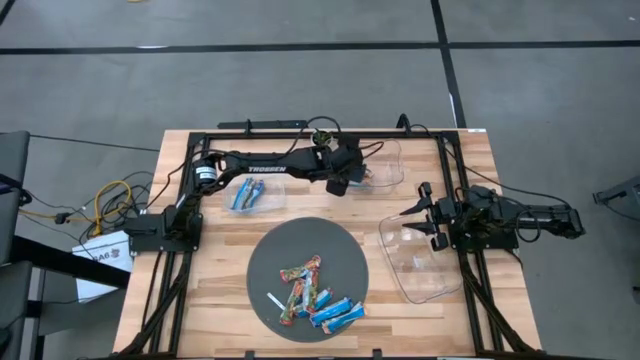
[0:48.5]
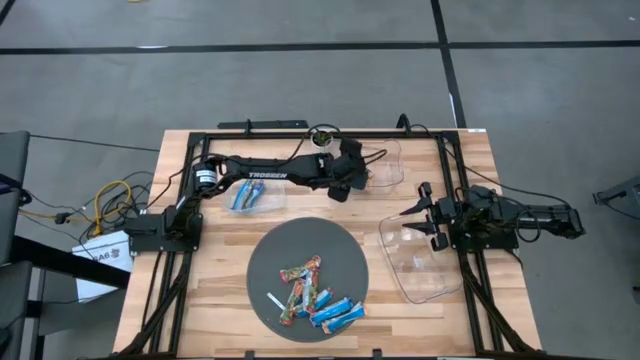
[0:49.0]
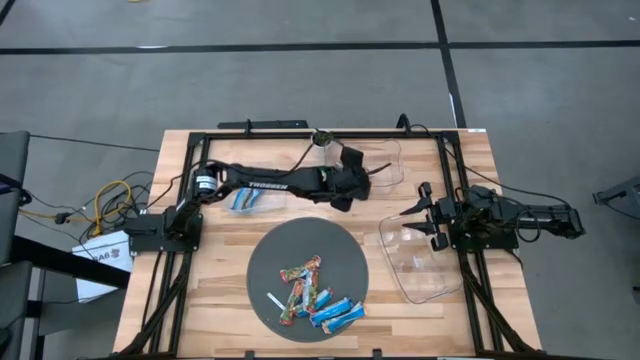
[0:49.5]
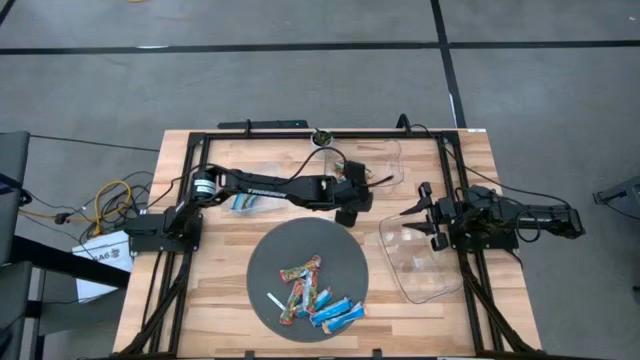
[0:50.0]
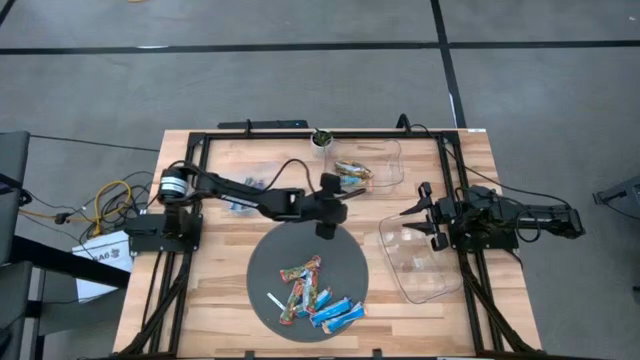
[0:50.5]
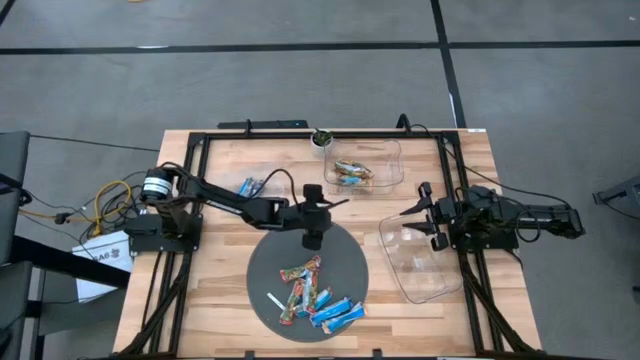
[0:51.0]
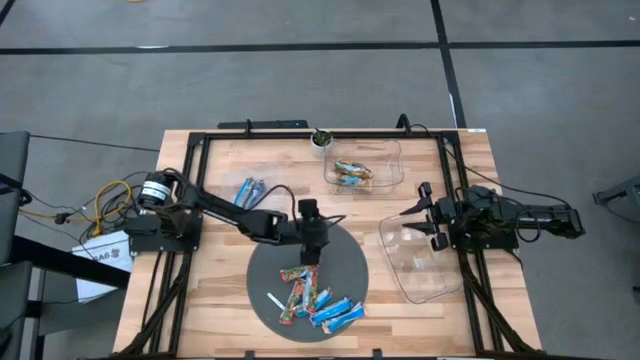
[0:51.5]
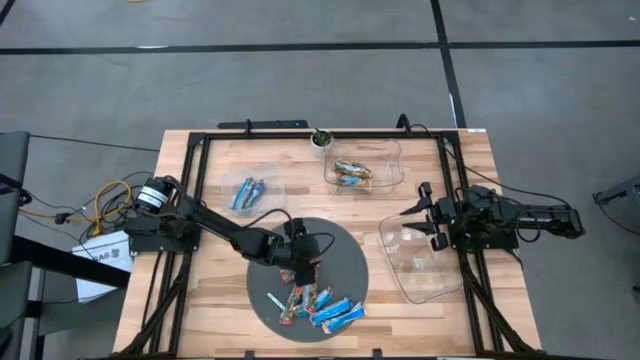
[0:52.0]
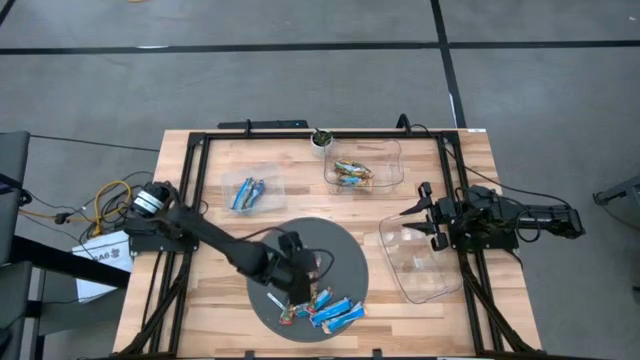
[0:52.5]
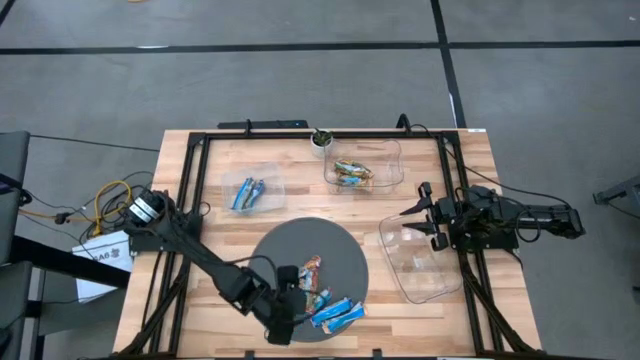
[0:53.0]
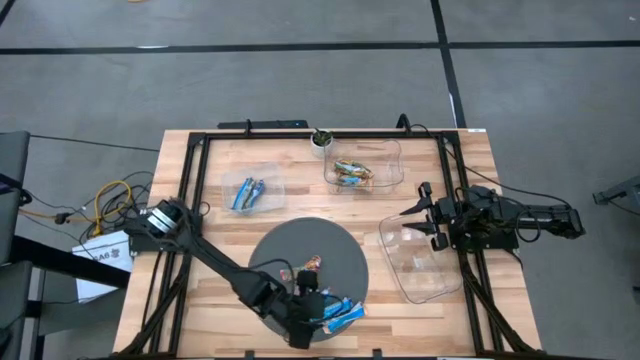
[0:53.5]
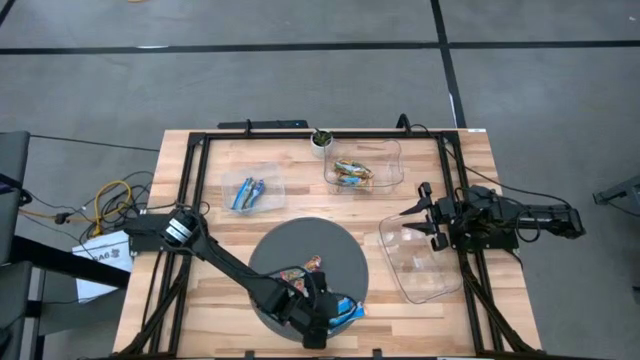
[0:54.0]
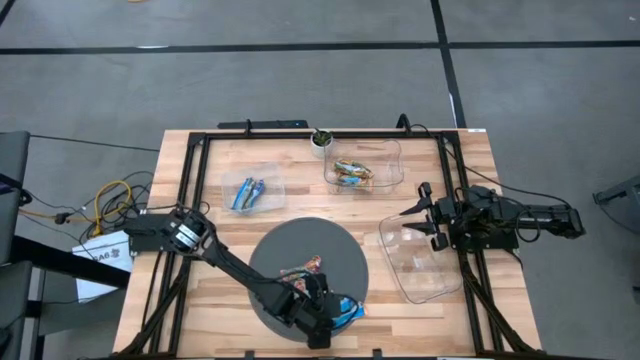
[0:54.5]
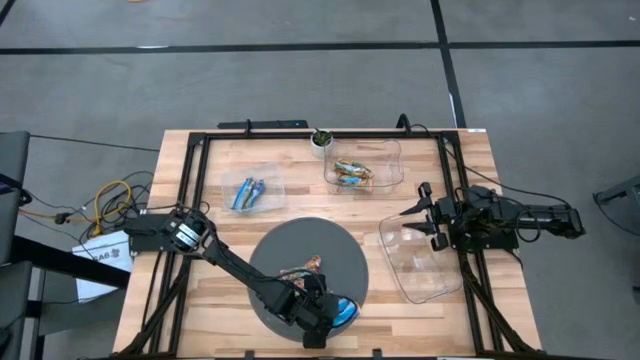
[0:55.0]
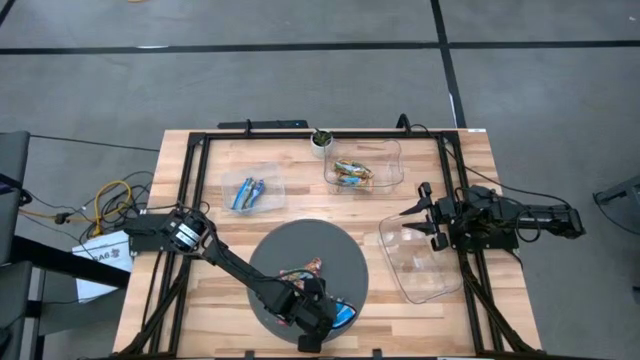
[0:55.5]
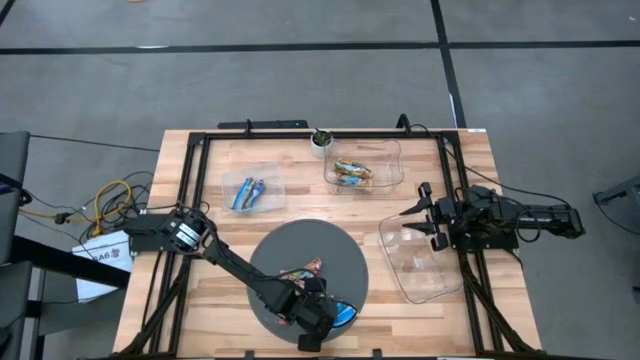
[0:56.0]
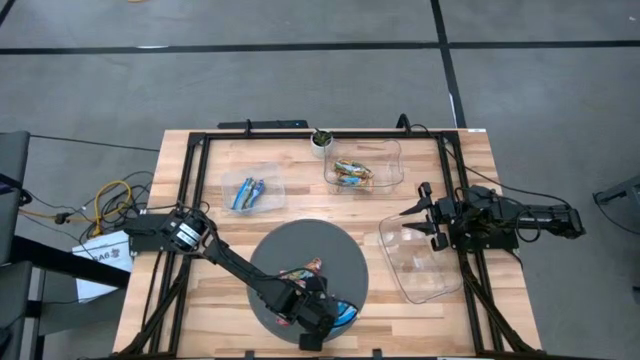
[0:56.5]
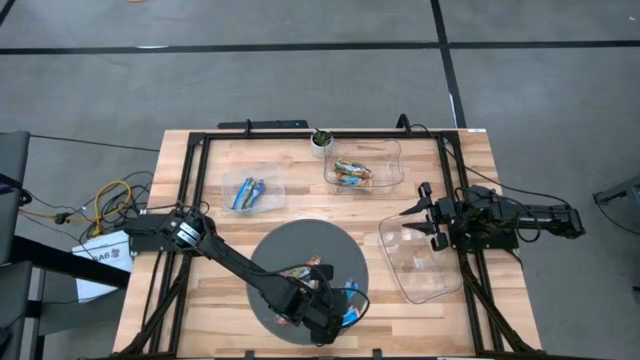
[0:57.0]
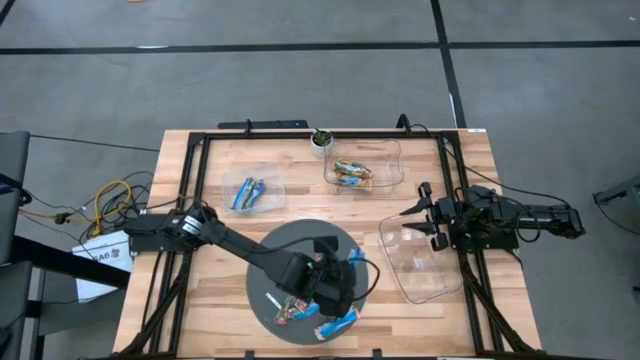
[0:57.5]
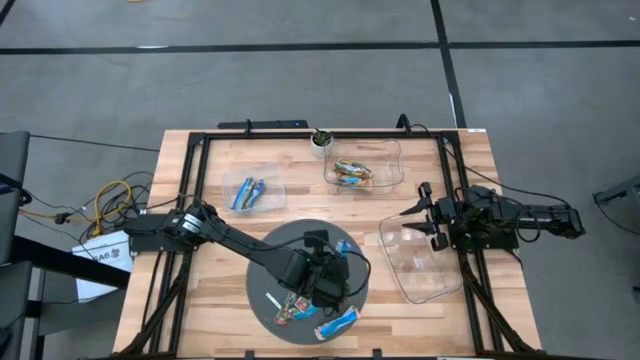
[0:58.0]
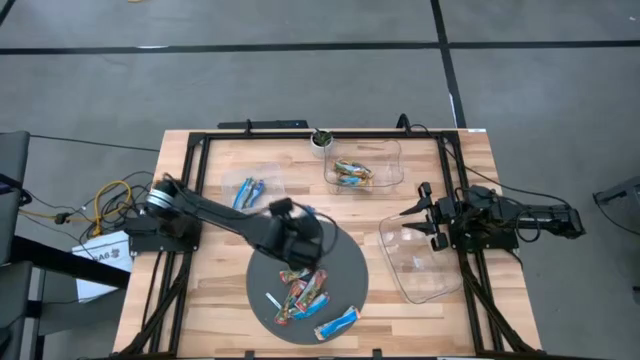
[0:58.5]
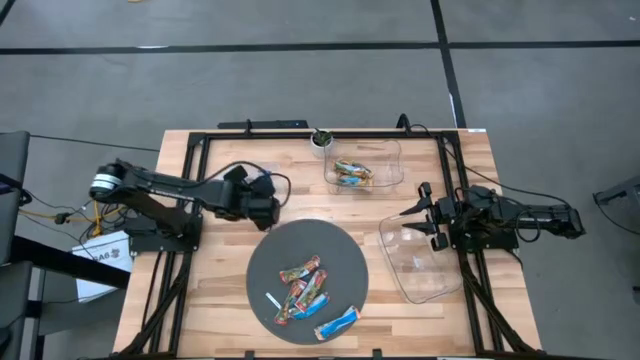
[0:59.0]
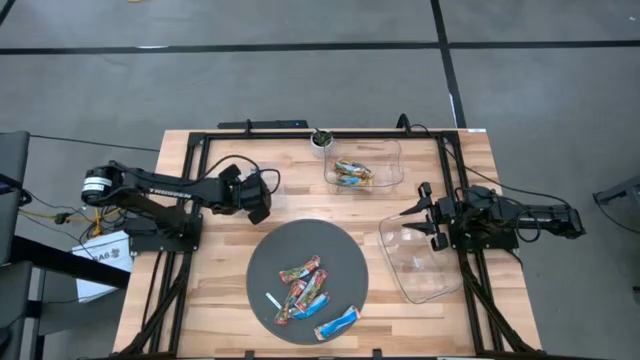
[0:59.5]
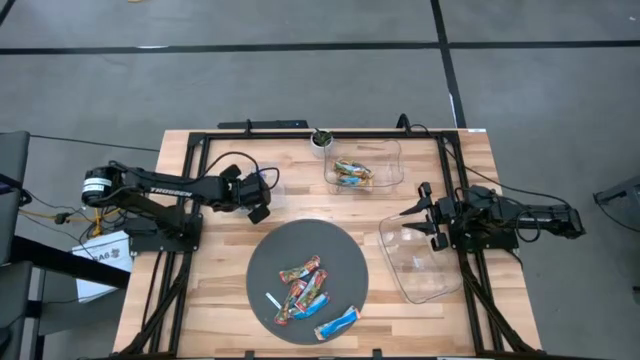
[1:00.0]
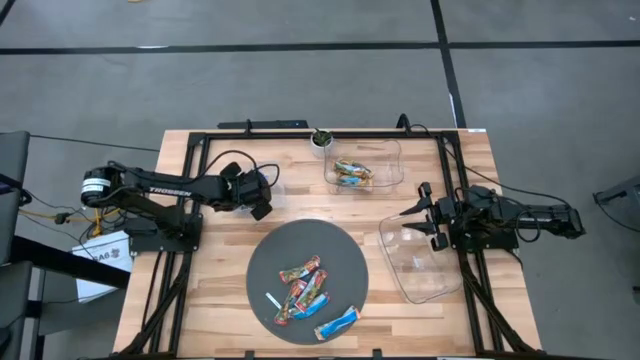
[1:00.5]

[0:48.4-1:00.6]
Task: Pick and place Granola Bars by type
Put the blue granola bar into the white bin

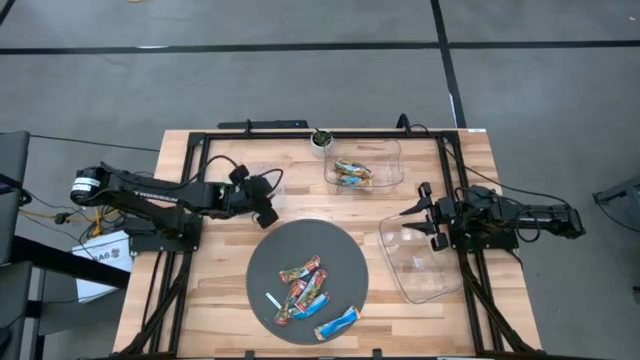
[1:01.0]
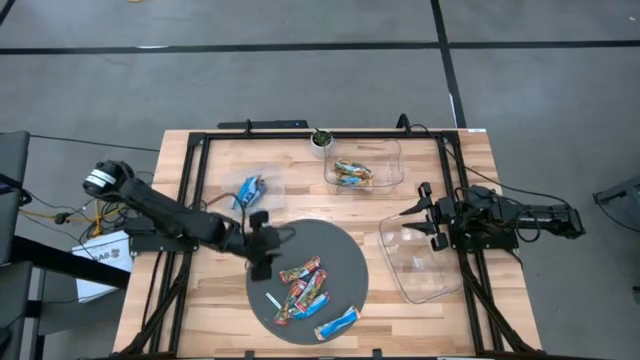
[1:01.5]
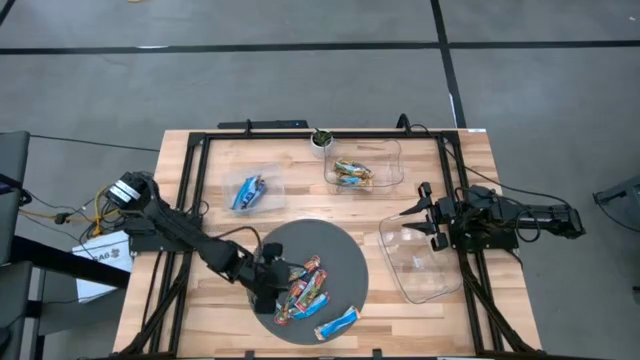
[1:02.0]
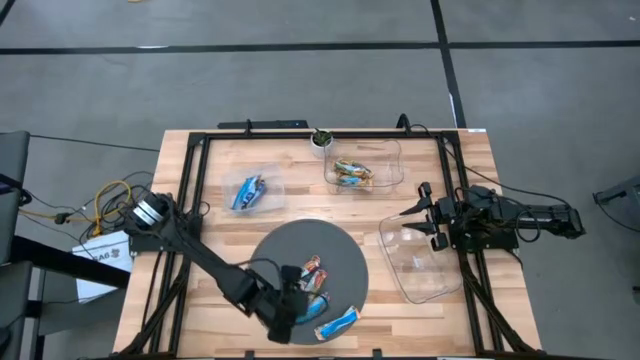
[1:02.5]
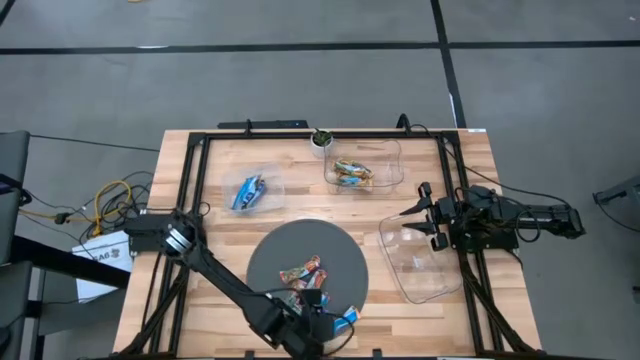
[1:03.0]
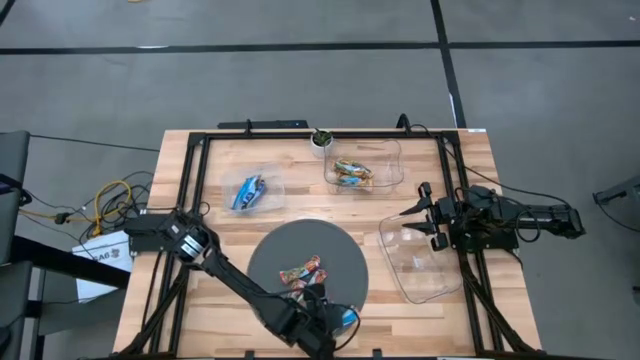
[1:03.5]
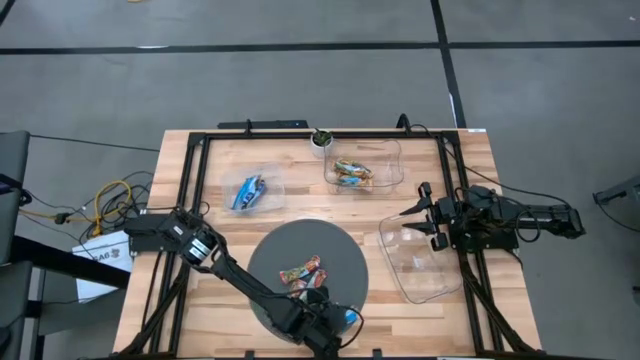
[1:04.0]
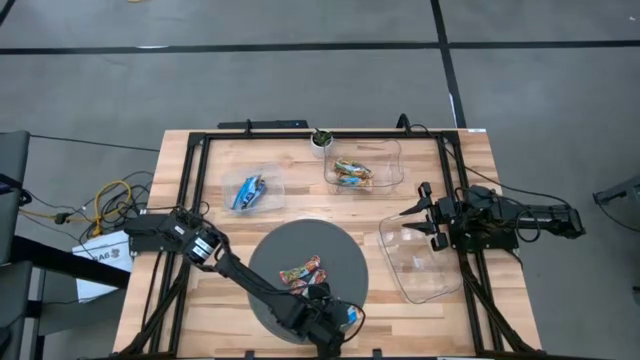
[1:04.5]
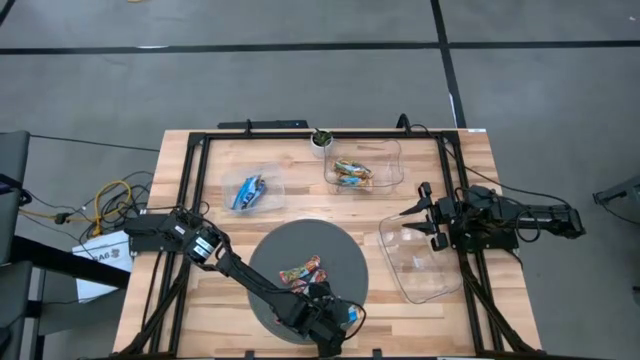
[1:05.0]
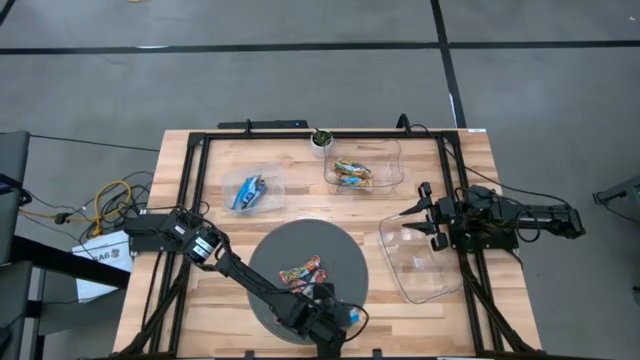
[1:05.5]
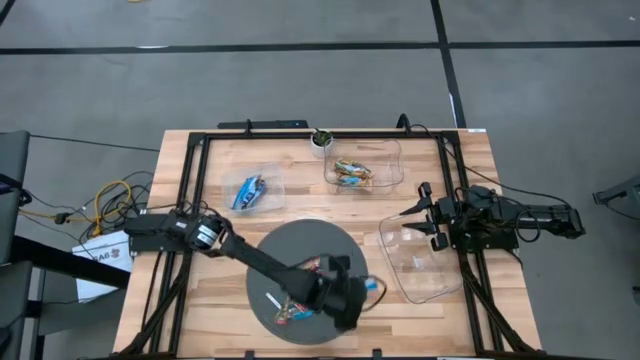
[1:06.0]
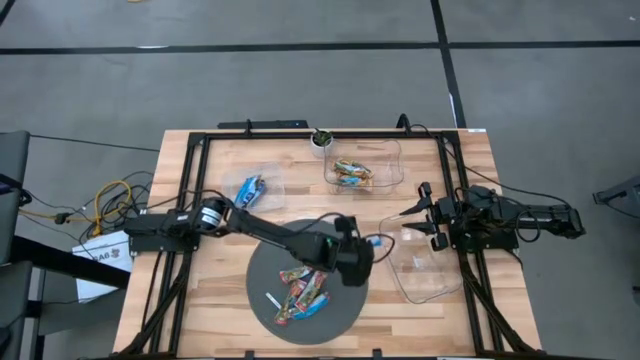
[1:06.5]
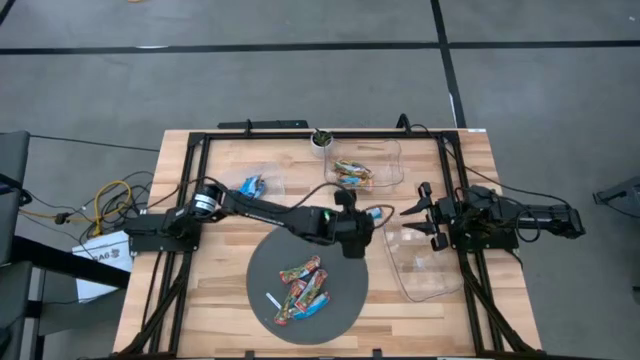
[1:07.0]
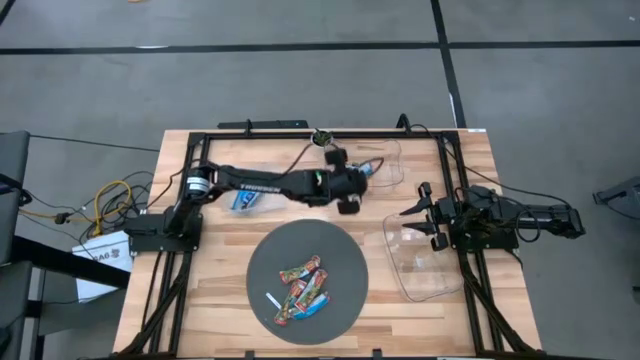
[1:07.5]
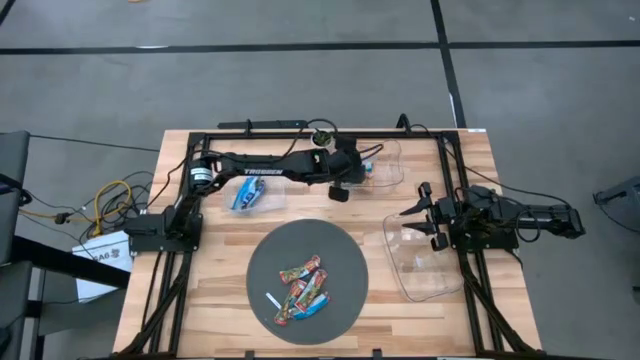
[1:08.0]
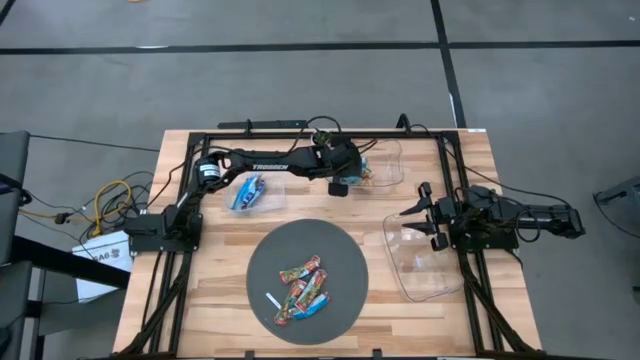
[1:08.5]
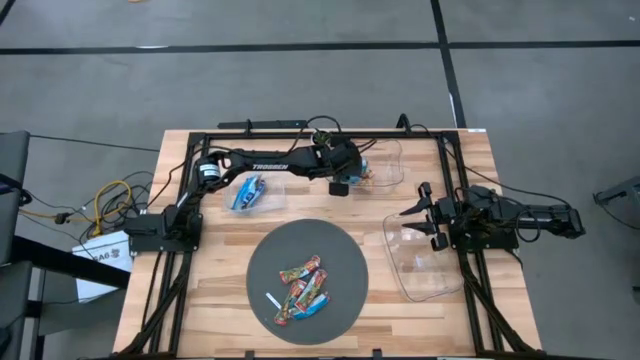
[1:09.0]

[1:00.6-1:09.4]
Put the yellow granola bar into the top transparent bin
